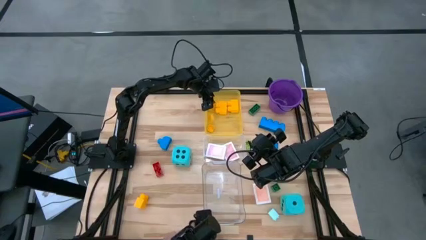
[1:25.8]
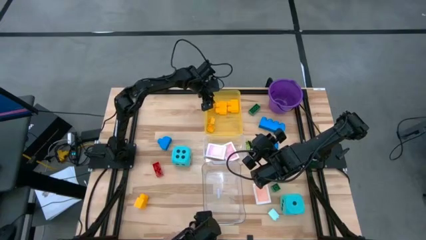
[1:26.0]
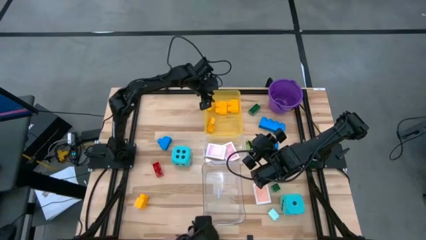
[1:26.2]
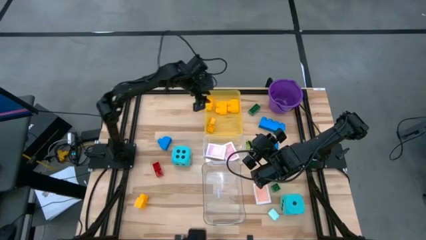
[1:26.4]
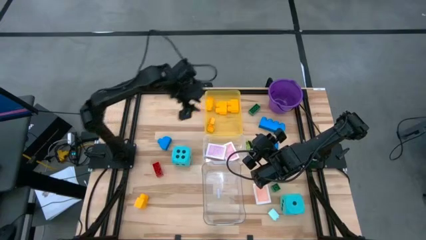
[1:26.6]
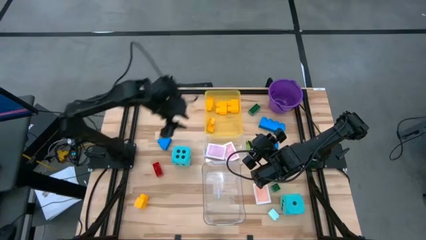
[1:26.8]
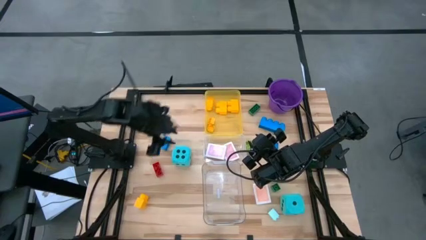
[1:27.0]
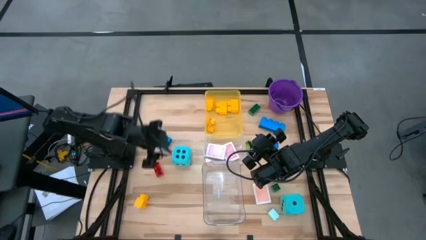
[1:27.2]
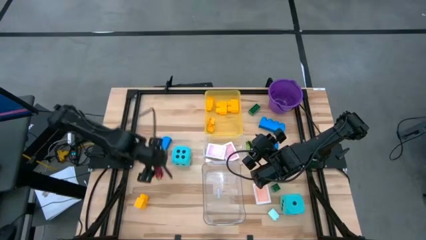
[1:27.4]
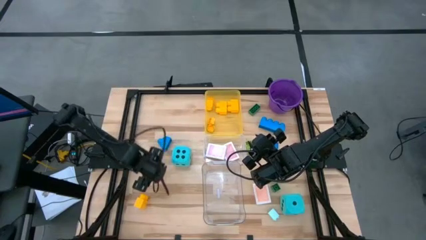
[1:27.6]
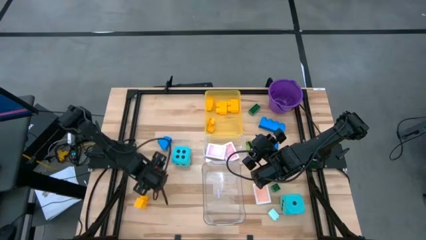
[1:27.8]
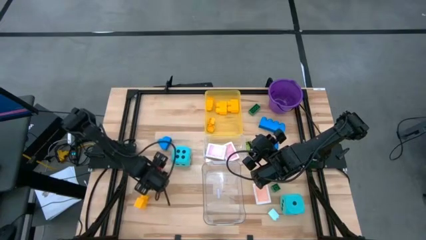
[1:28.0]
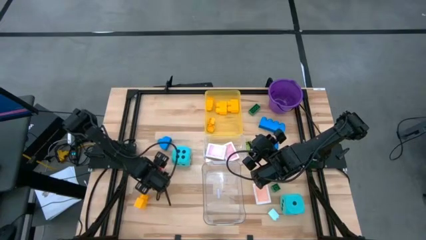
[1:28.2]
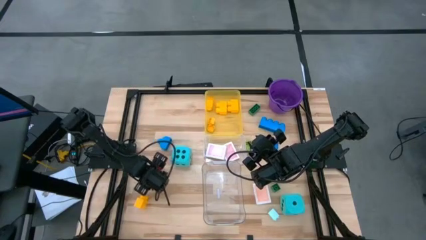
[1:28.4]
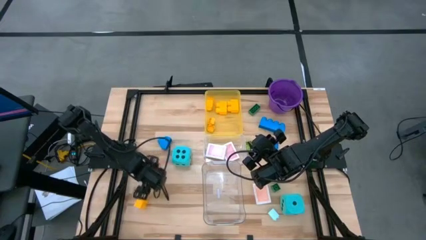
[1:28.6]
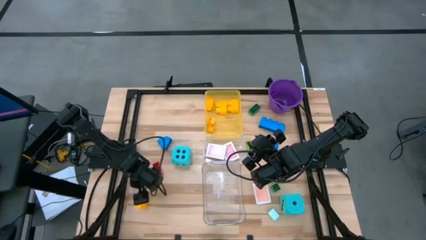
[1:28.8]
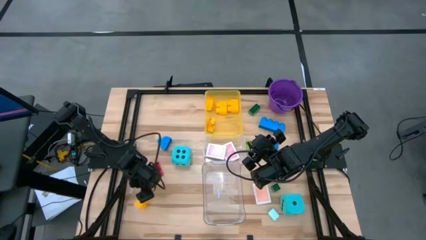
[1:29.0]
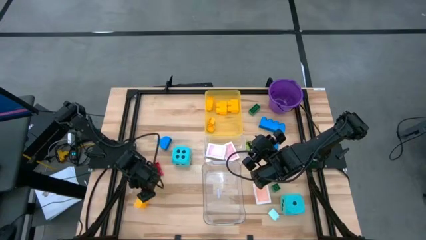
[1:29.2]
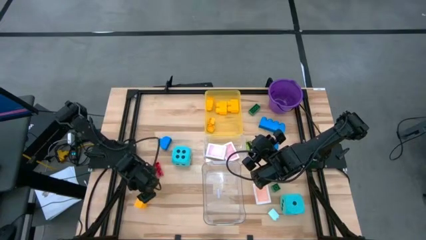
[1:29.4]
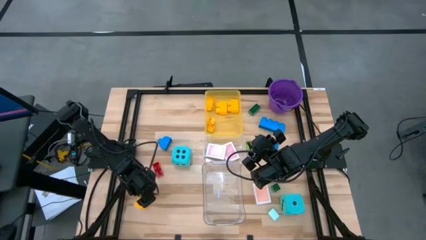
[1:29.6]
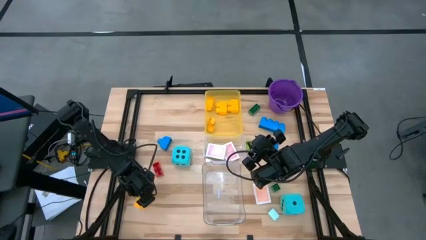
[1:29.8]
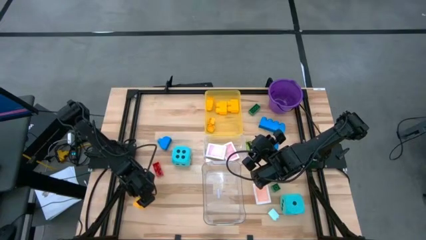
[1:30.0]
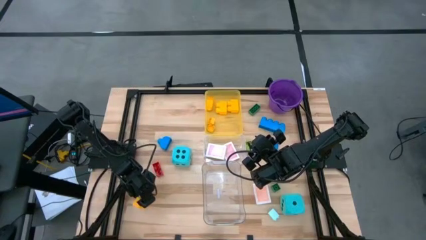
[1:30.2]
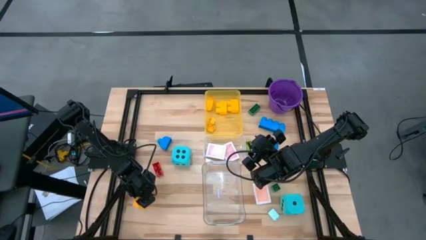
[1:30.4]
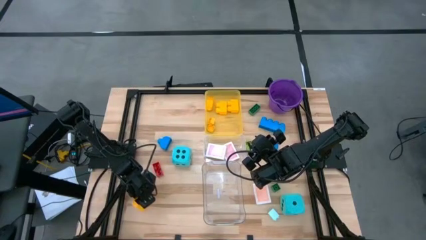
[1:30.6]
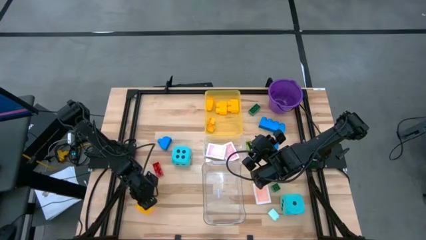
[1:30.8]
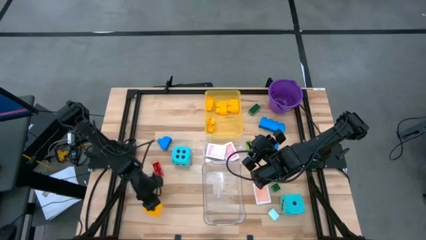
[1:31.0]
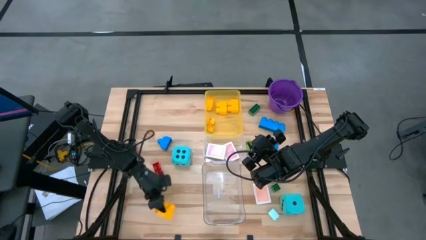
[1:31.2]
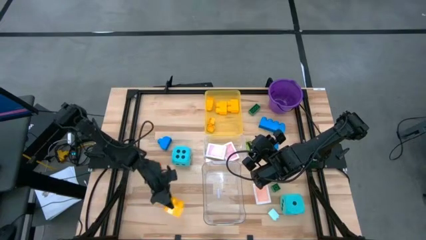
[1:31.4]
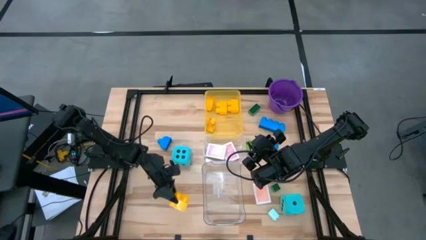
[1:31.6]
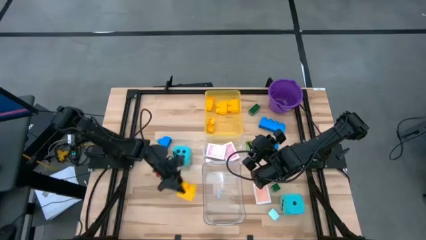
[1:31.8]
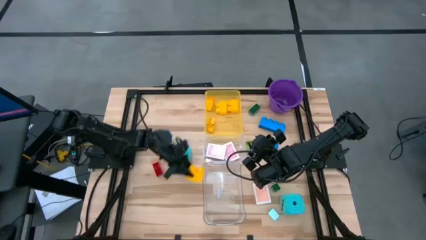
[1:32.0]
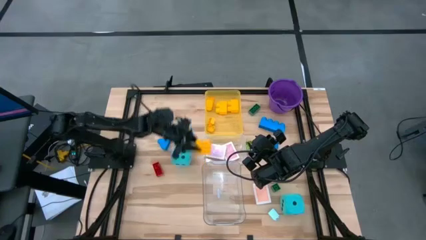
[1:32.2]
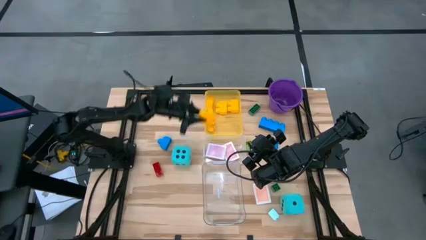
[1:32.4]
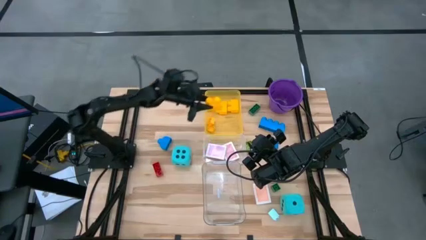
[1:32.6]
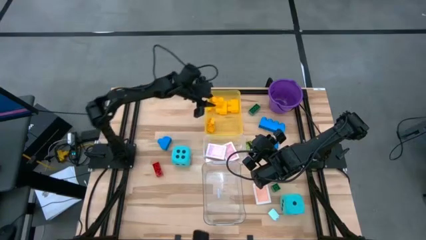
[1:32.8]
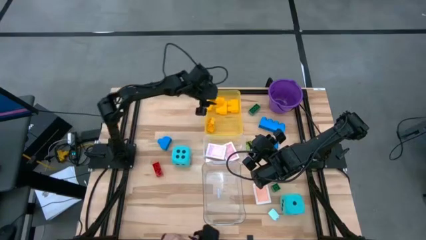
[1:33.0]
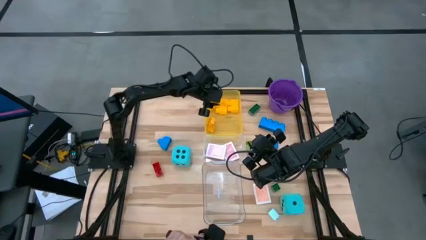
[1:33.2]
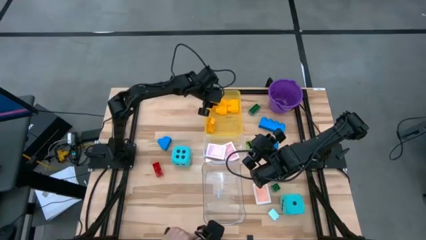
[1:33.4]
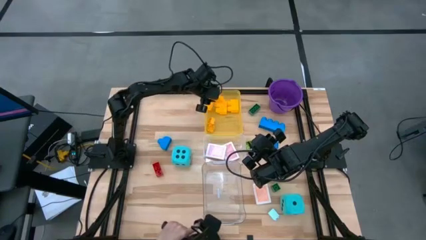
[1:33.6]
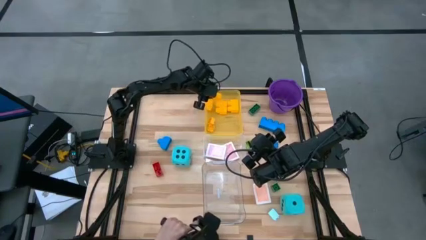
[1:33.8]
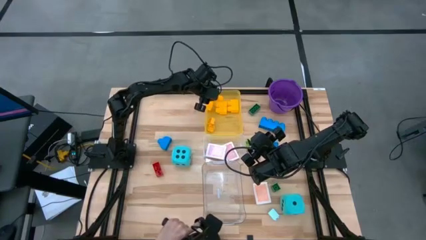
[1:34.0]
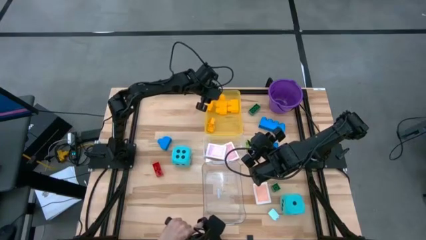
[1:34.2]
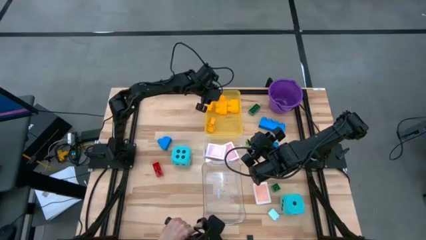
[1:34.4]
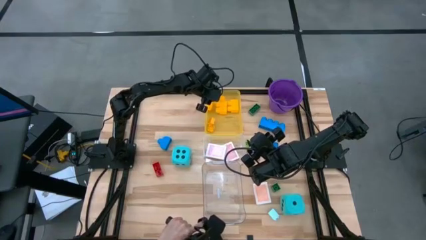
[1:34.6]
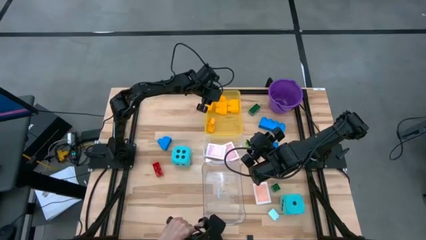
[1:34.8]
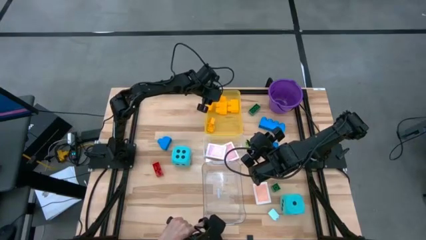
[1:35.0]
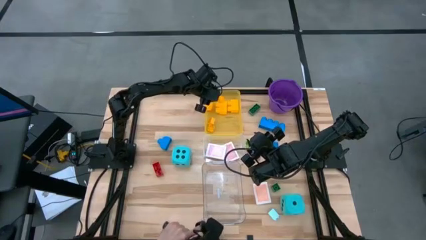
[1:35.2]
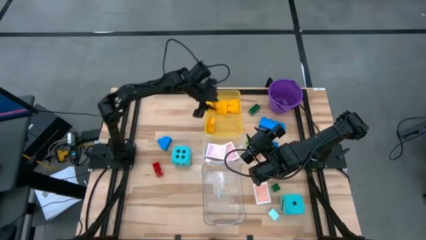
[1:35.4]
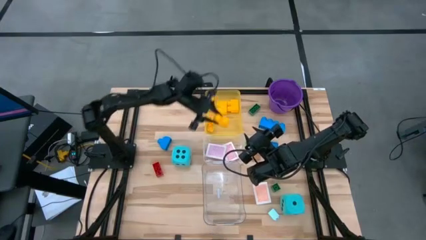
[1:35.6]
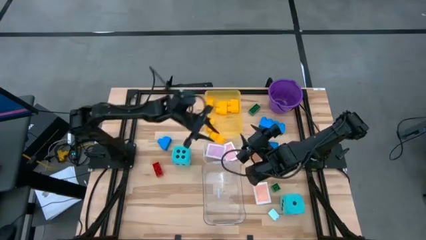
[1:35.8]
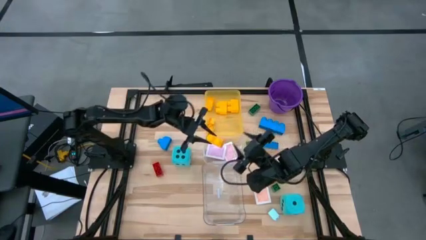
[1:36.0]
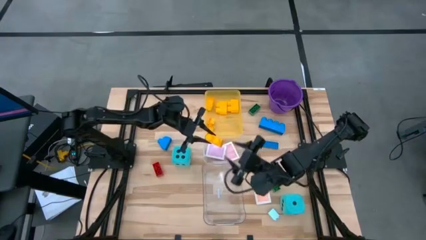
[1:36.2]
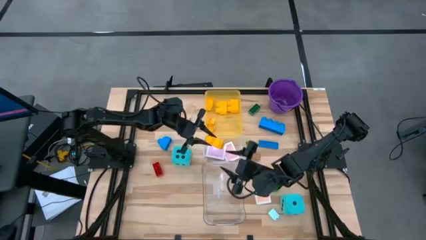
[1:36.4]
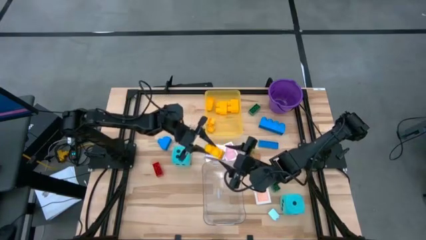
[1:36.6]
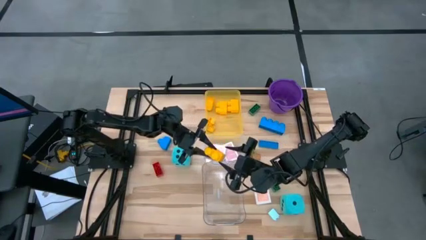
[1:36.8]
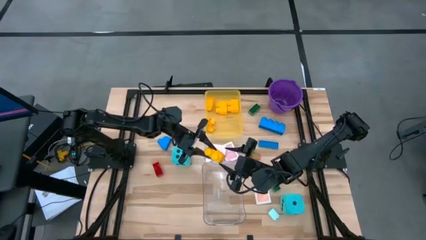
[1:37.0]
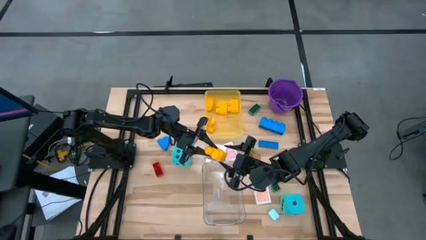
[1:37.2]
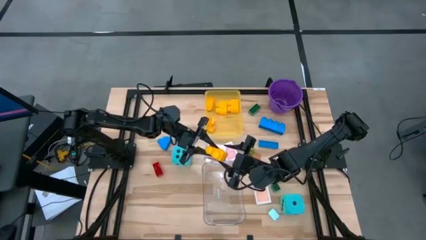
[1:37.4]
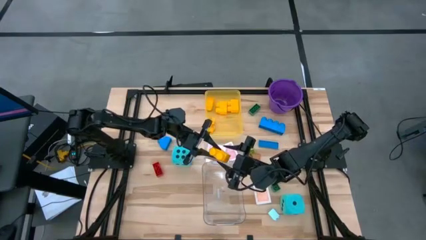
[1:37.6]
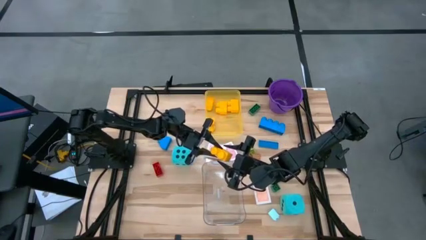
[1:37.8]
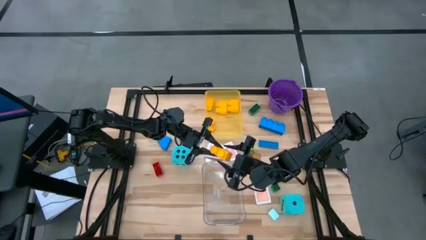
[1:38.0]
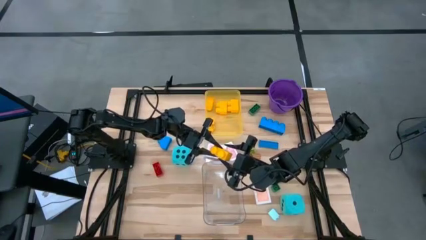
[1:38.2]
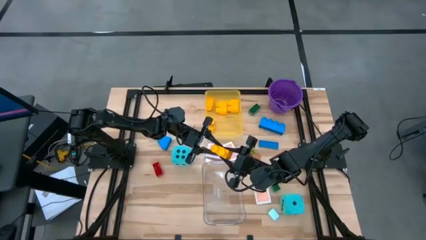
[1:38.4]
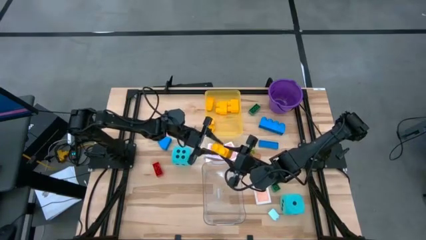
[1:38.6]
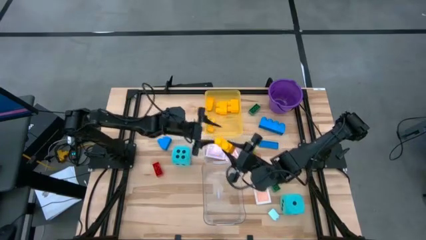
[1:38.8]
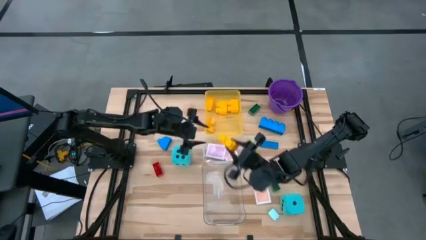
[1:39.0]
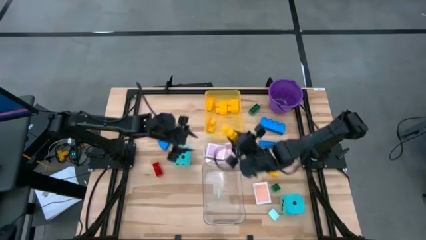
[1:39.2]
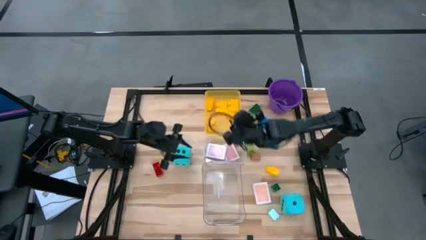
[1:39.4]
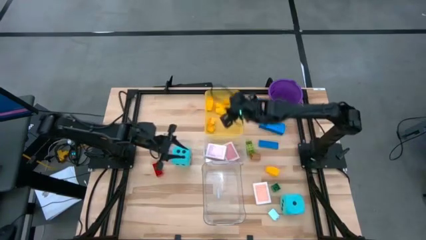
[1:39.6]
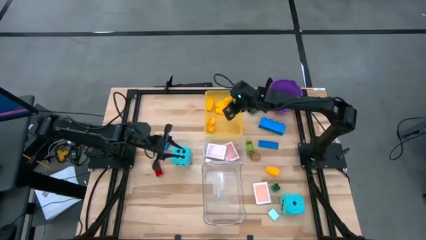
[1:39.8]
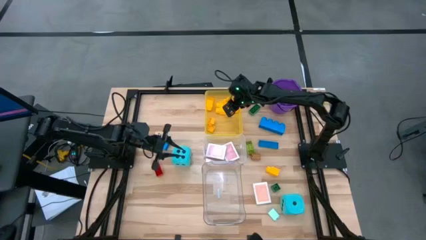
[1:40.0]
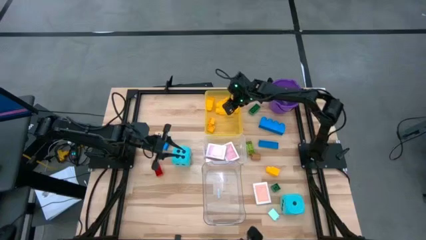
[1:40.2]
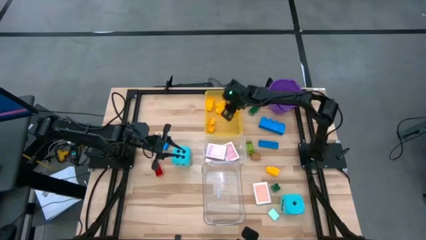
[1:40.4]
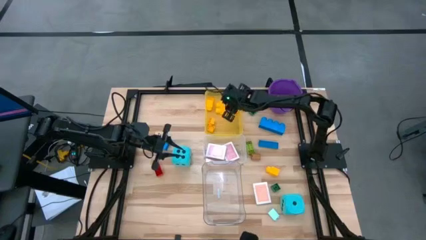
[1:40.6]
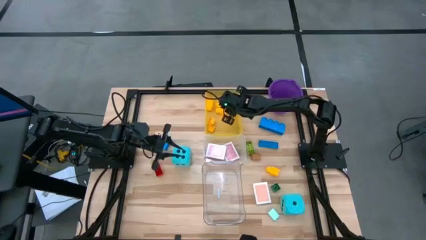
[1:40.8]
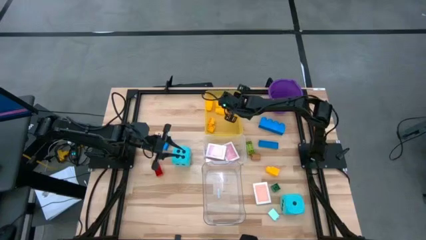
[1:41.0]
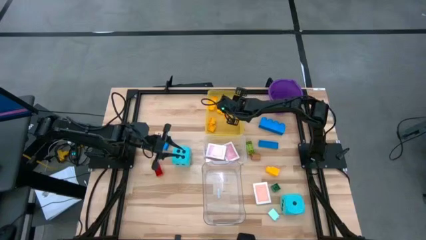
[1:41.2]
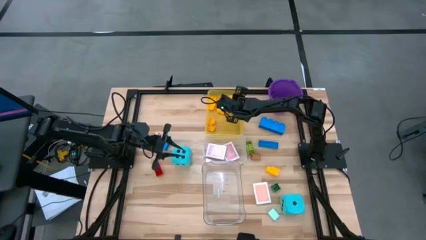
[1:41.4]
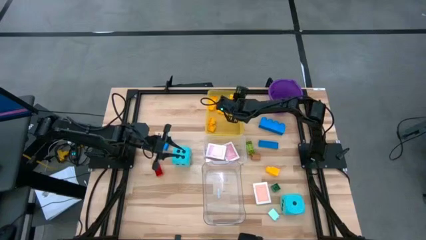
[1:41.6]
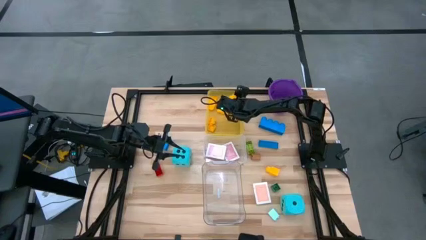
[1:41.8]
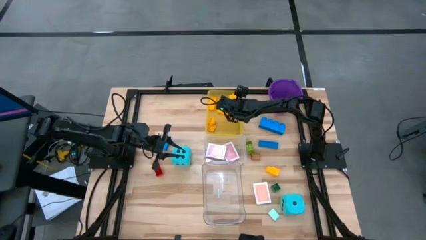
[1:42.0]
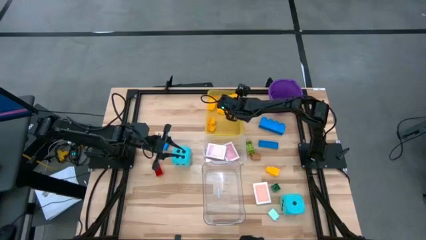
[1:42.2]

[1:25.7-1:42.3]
Task: Pick & Place Toys
Put the yellow game piece into the yellow bin

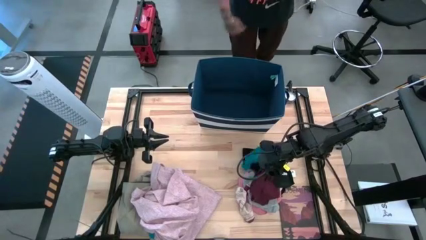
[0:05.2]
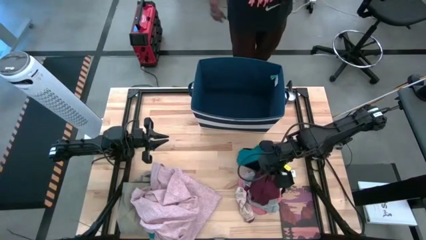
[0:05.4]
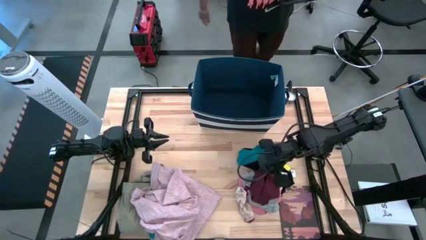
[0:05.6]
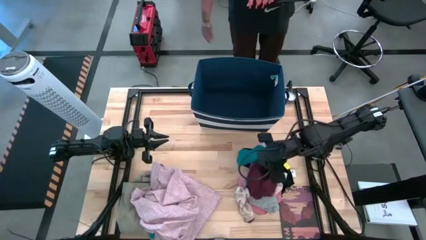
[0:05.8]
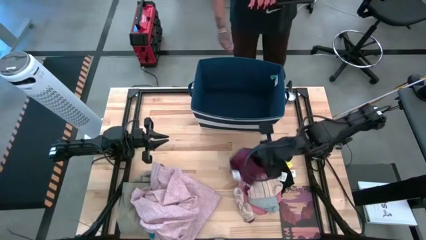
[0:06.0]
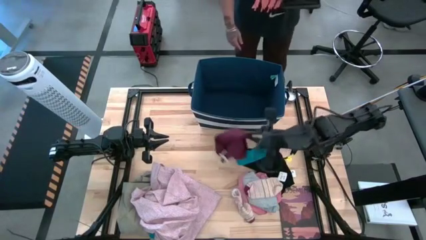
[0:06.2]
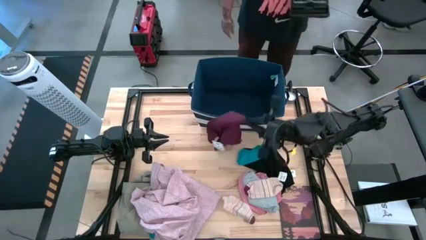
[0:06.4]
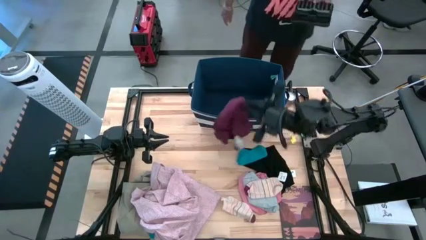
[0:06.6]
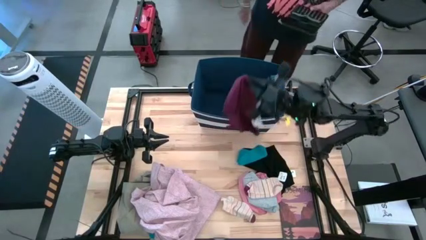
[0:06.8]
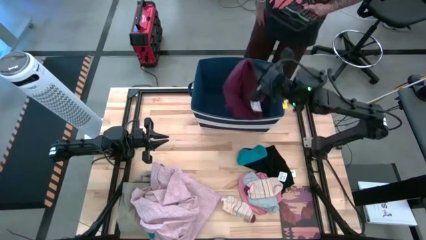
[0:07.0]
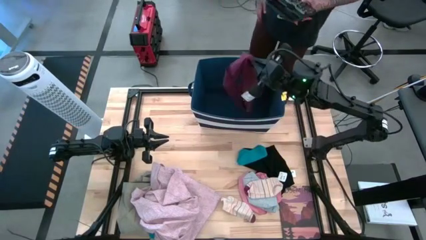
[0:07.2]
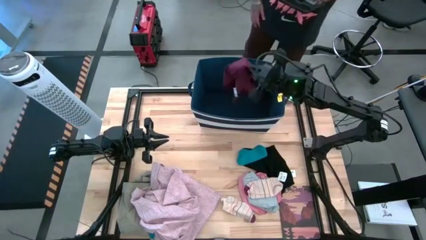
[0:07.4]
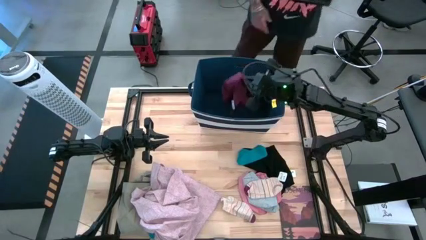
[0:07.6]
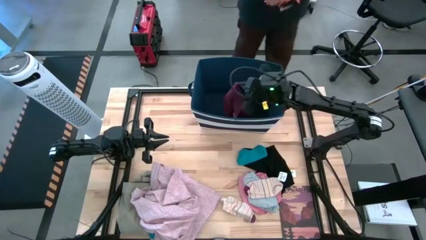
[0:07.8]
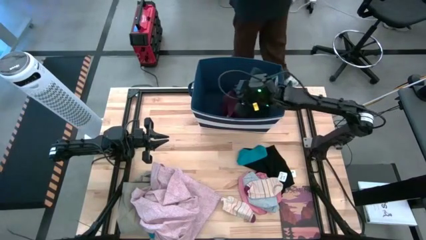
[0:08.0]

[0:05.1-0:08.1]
Task: Sort clothes
Put the red boxers into the blue laundry bin
